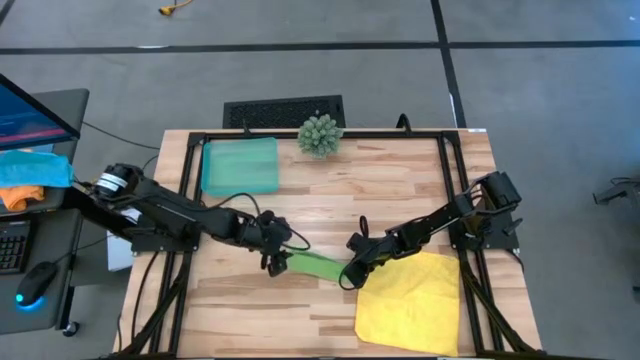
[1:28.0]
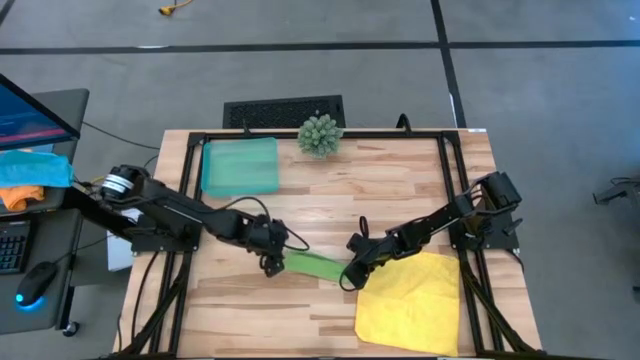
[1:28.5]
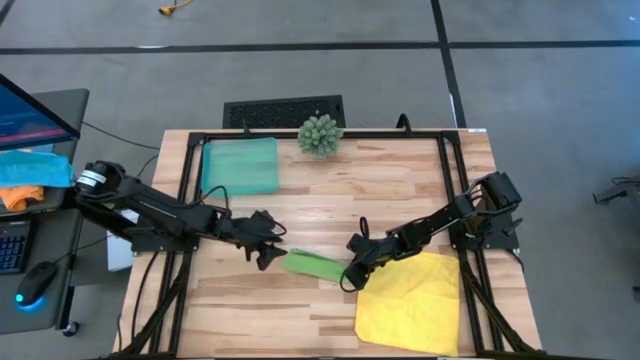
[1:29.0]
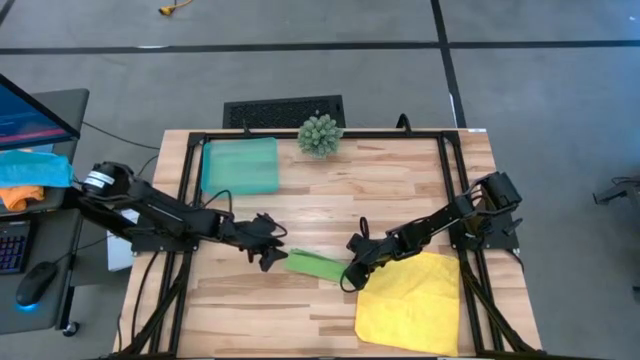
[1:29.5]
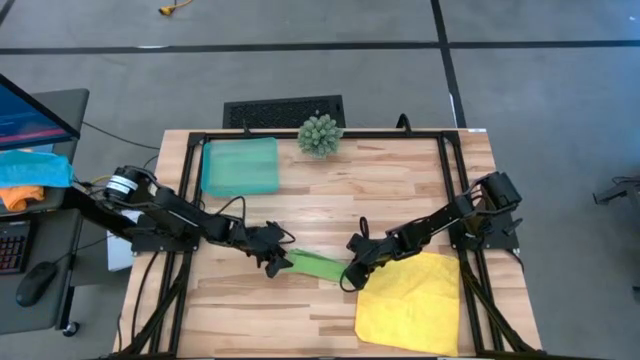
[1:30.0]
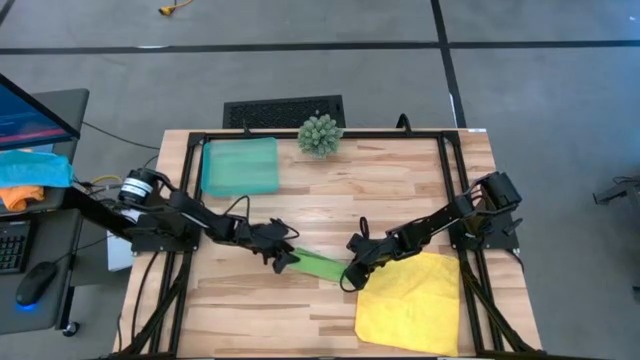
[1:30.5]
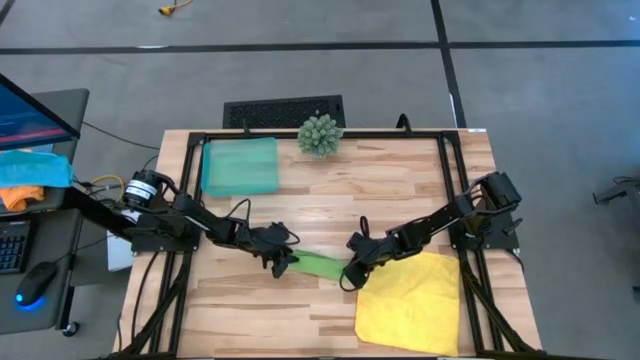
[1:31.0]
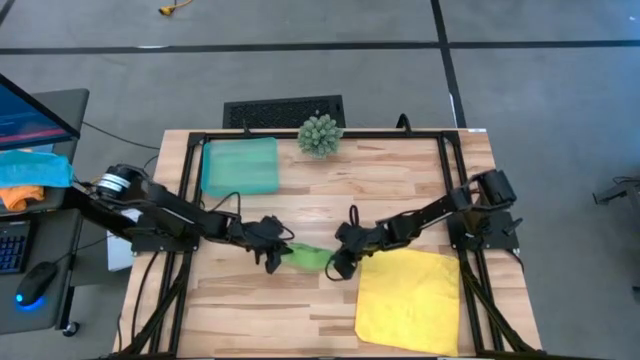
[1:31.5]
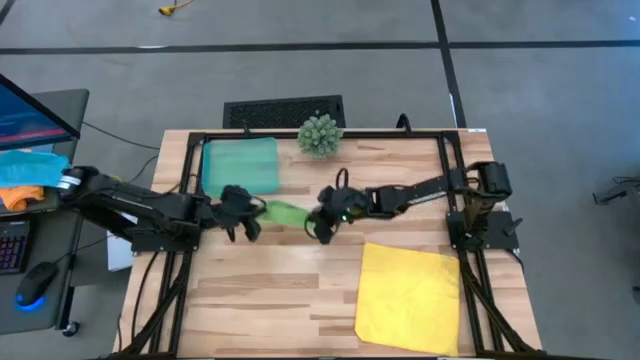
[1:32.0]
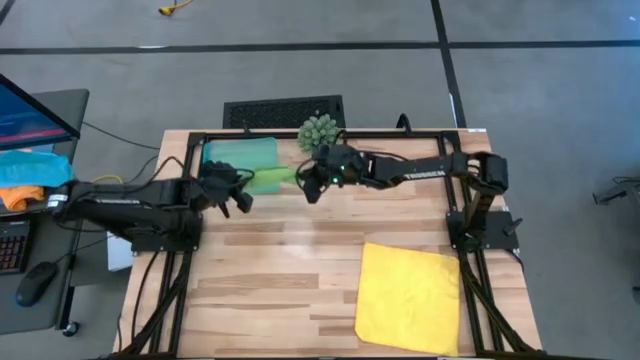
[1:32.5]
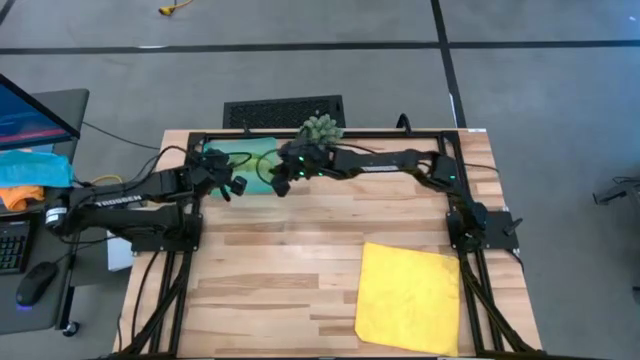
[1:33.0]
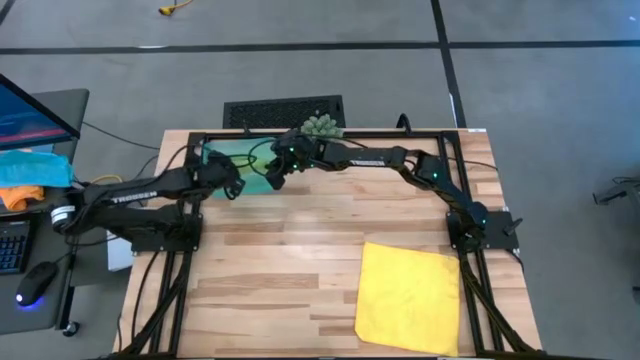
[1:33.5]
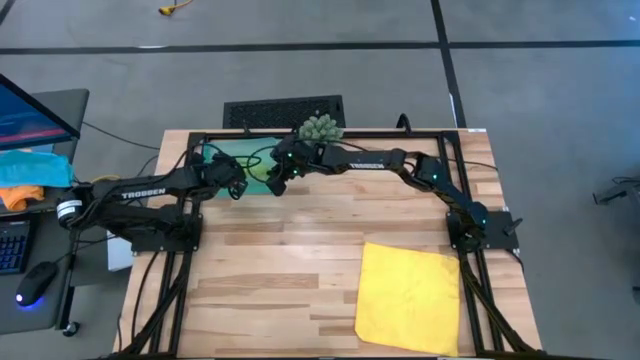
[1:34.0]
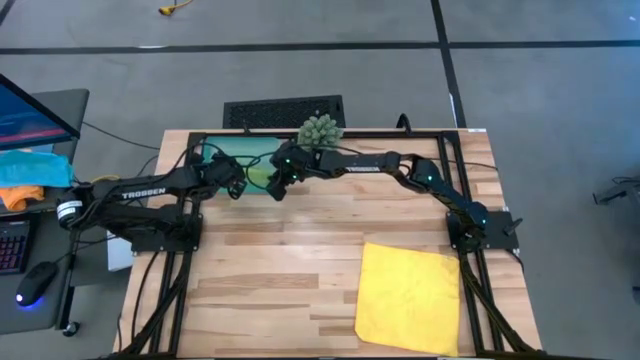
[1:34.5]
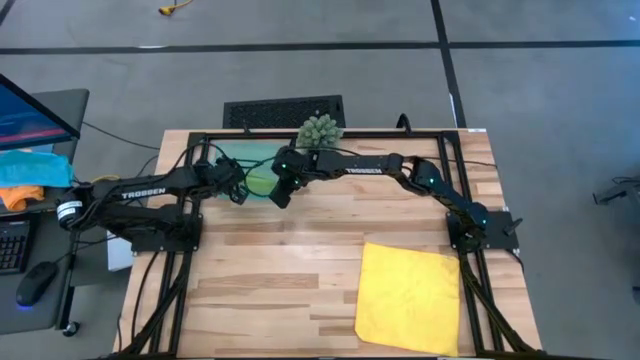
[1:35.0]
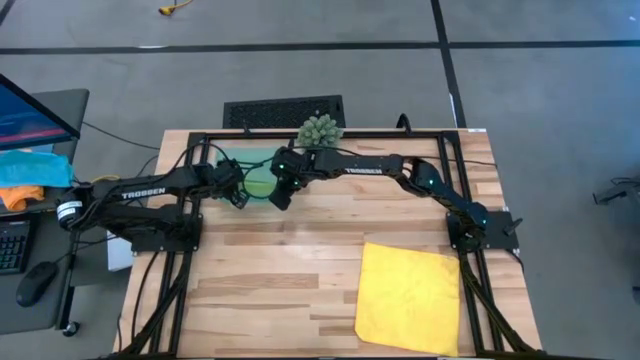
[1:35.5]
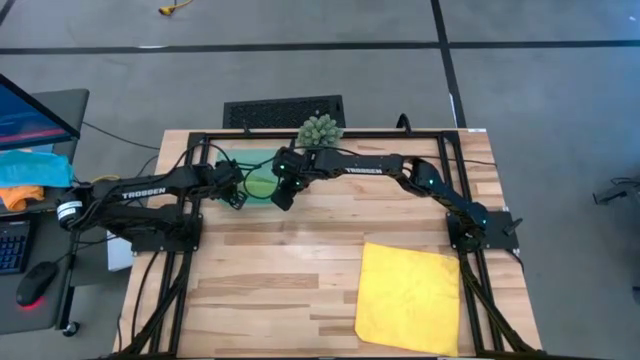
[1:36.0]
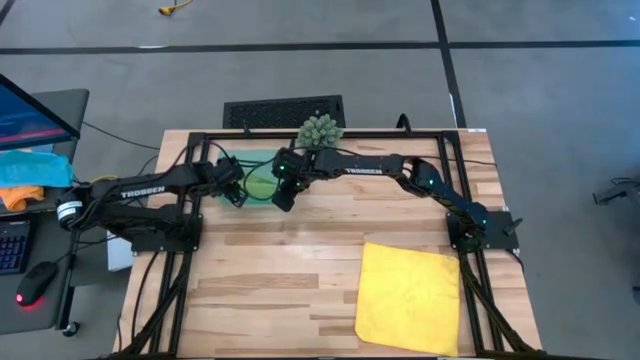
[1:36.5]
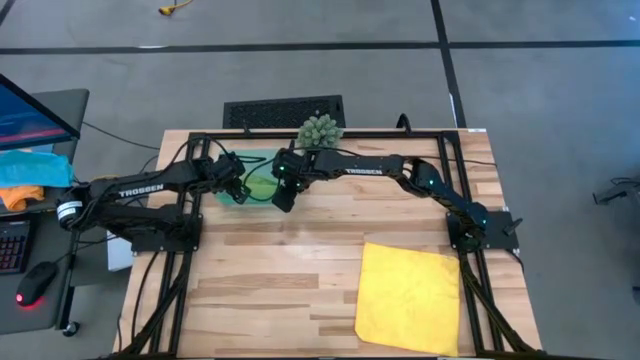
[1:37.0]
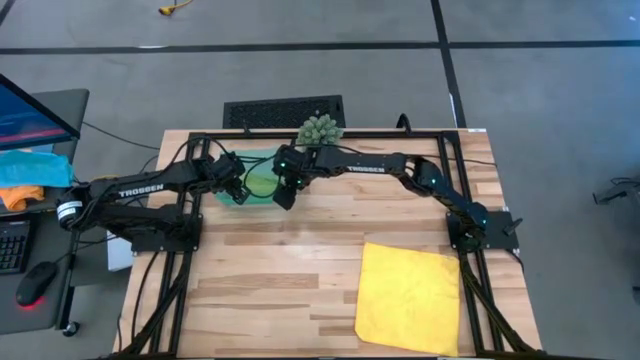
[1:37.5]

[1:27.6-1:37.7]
Task: Roll microfiber towels into tight, uniform cylinder then place into a basket
Put the rolled green towel into the green bin

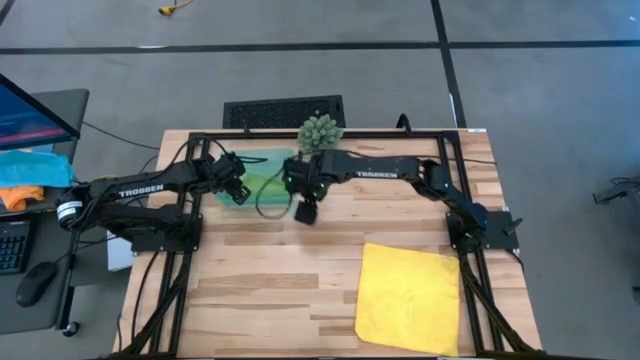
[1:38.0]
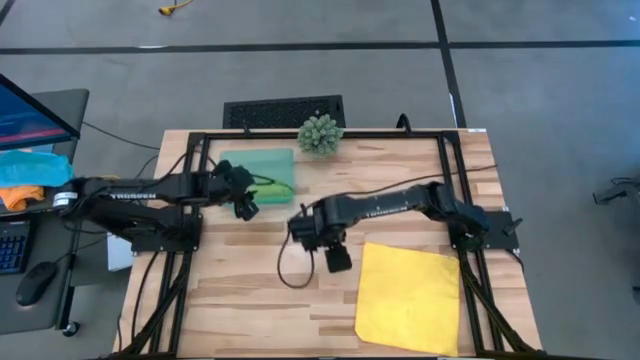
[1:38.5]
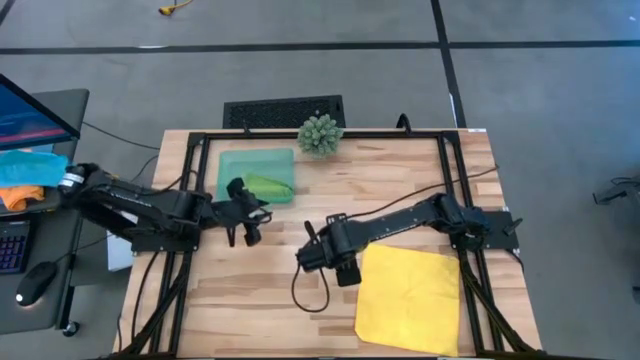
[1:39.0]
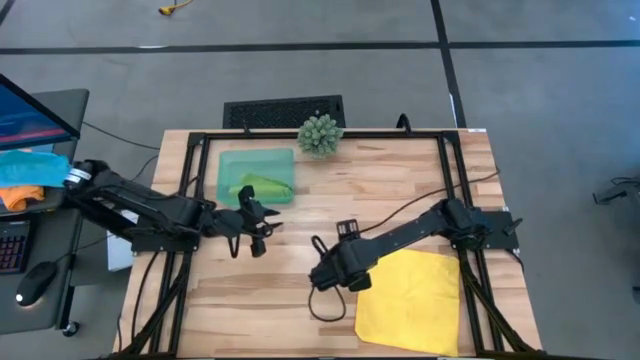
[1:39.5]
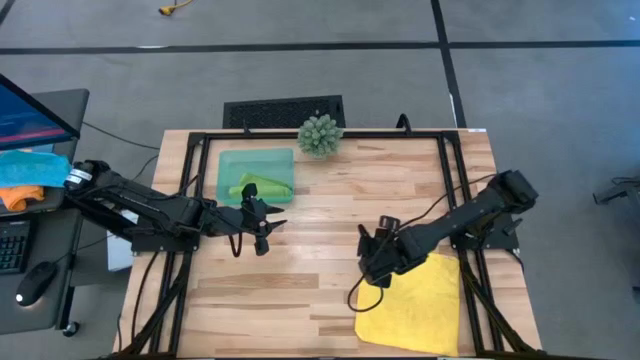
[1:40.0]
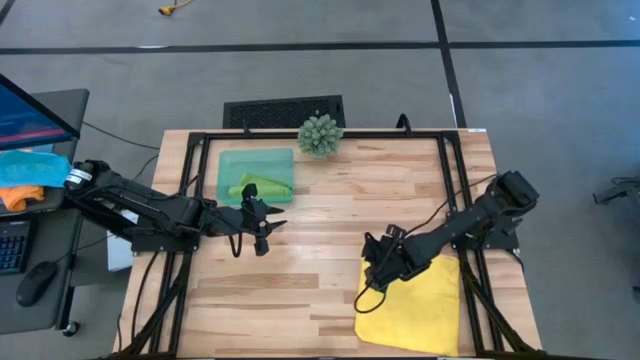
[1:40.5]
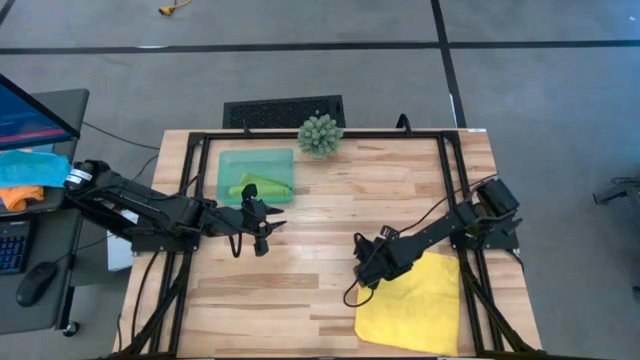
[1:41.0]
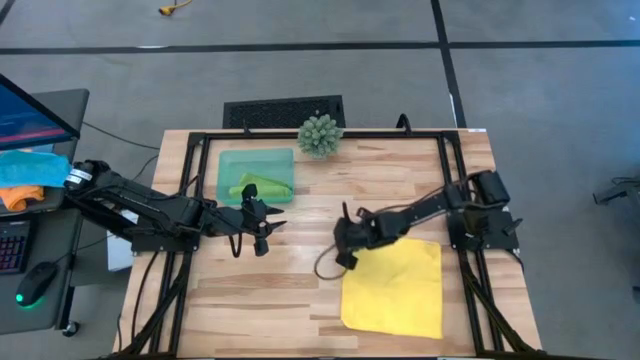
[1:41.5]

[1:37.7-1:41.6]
Fold the yellow towel

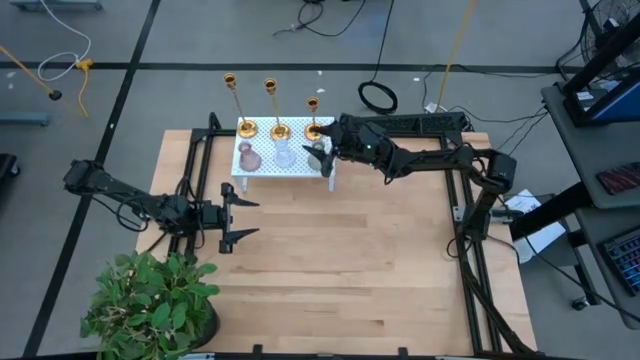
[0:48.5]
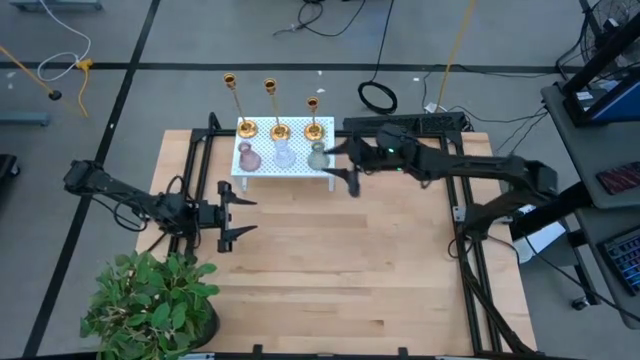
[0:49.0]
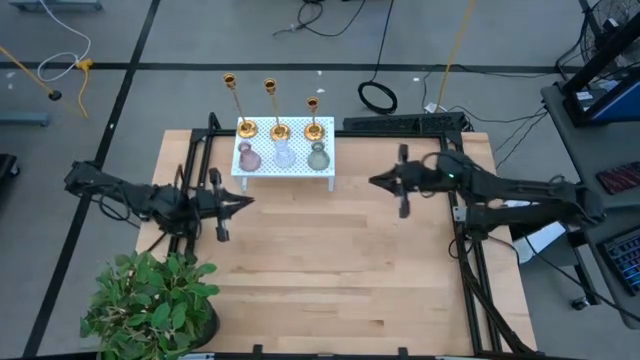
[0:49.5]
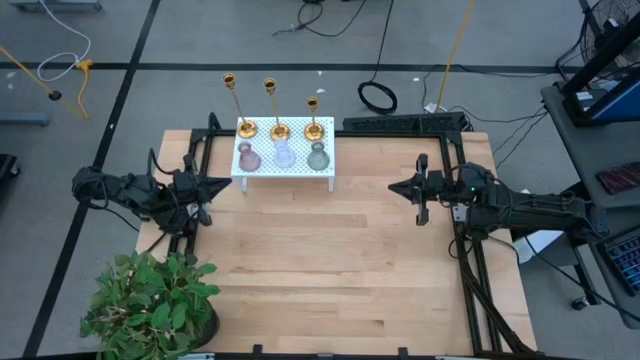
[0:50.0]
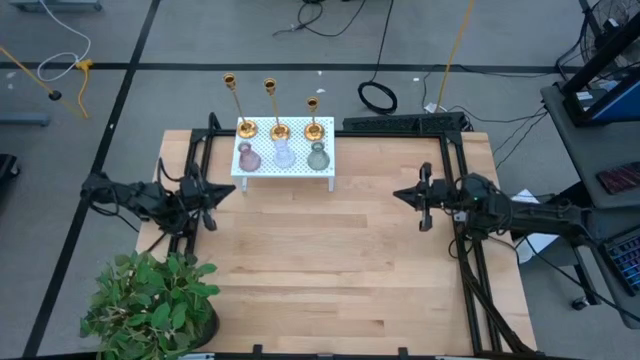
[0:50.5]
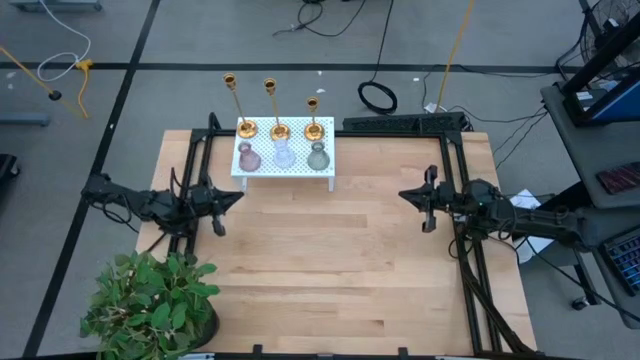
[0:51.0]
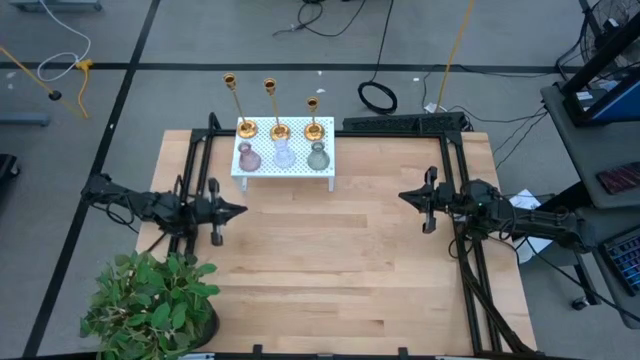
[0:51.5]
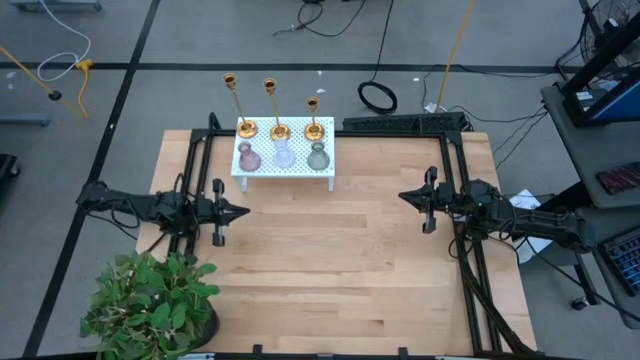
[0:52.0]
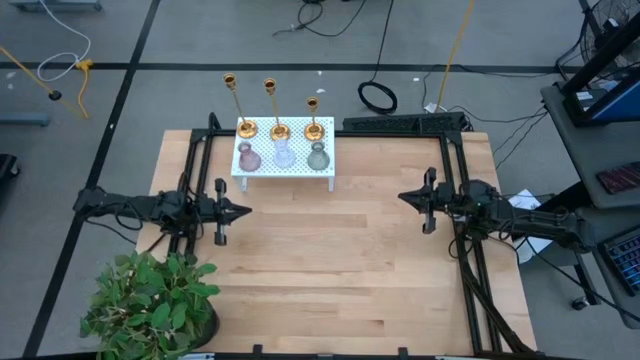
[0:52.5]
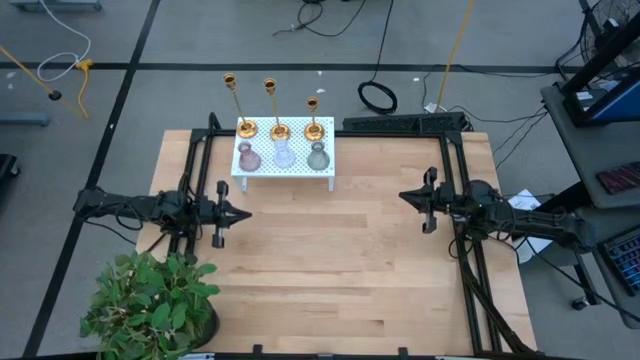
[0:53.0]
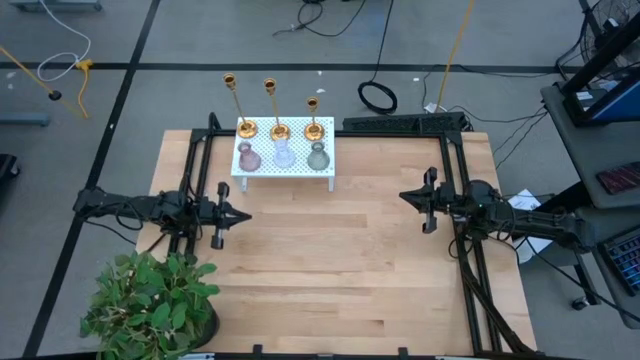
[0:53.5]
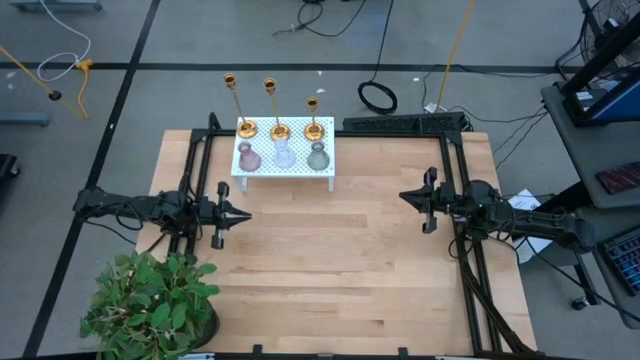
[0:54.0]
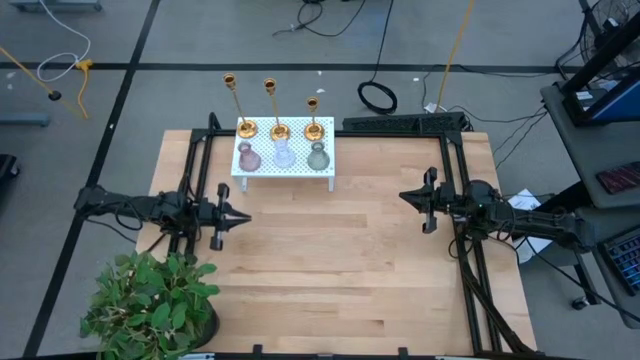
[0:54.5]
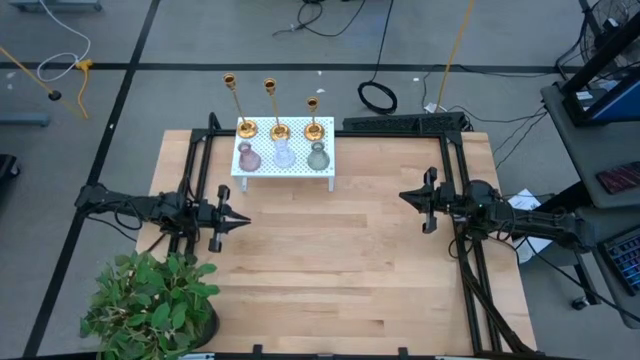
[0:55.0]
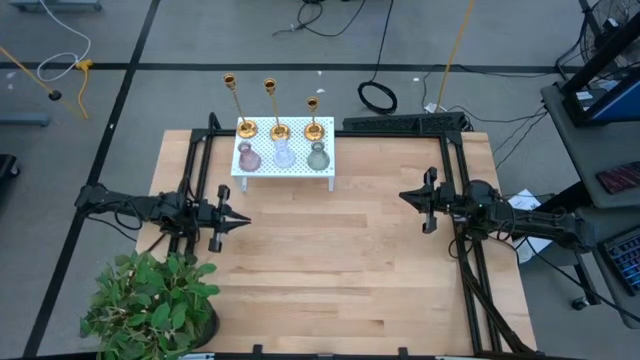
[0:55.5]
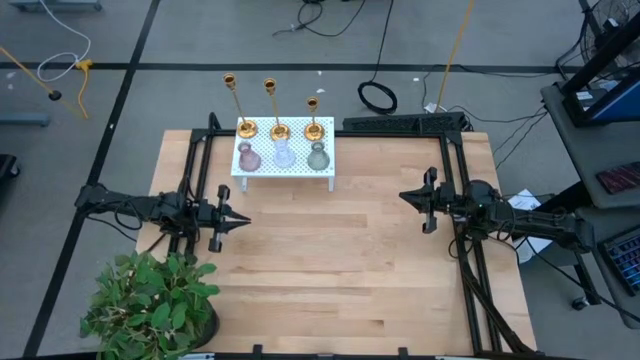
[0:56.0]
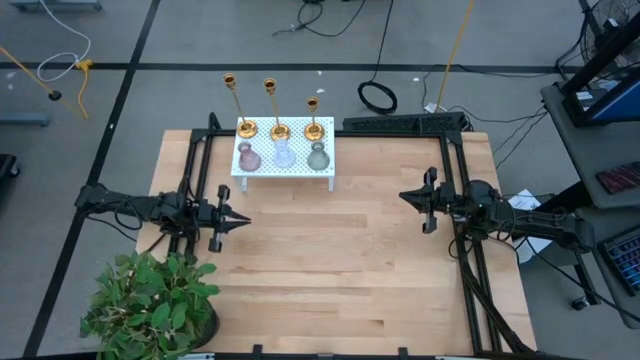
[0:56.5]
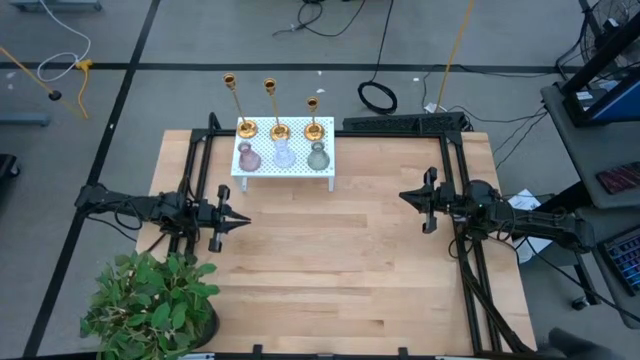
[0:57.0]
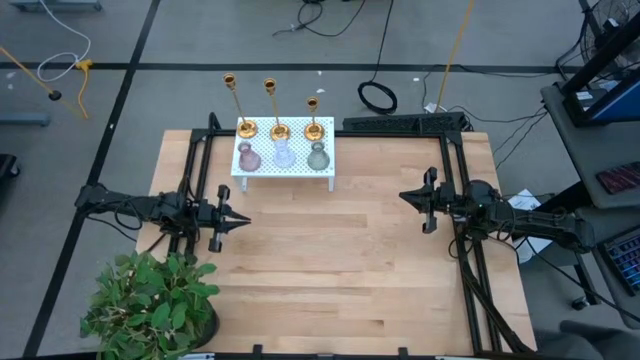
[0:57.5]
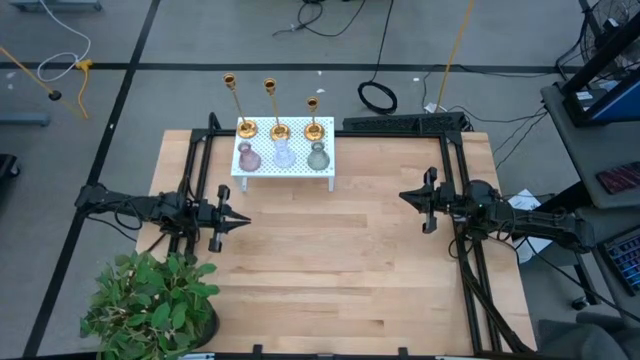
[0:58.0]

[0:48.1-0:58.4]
Task: Pick & Place candle stick holders
Return to Home Position
